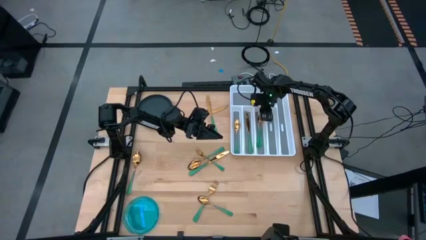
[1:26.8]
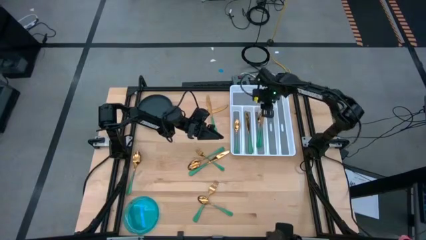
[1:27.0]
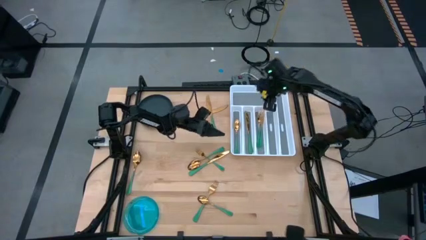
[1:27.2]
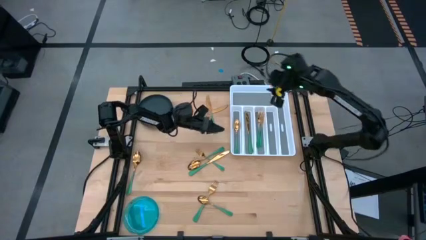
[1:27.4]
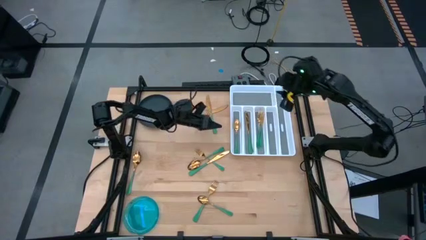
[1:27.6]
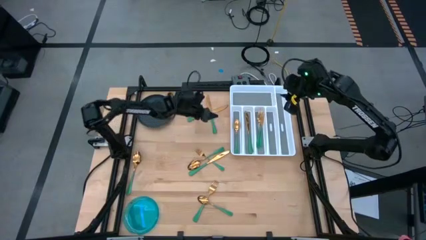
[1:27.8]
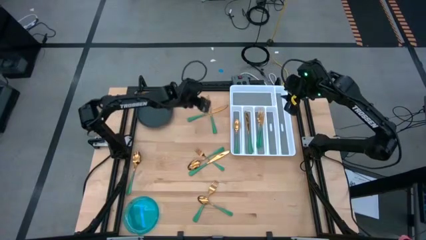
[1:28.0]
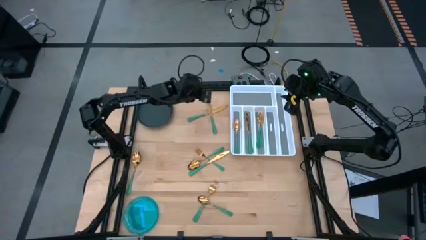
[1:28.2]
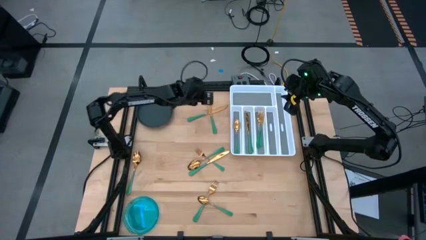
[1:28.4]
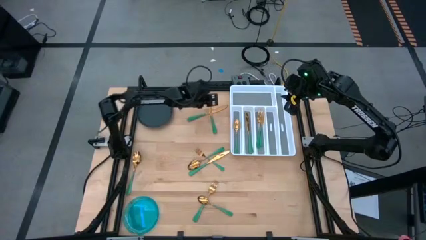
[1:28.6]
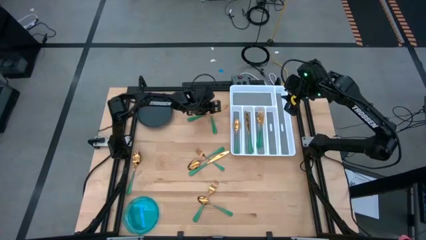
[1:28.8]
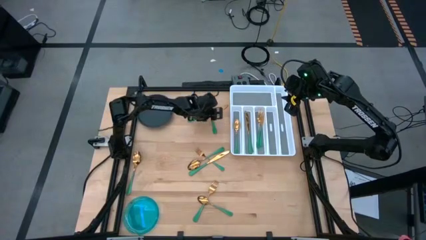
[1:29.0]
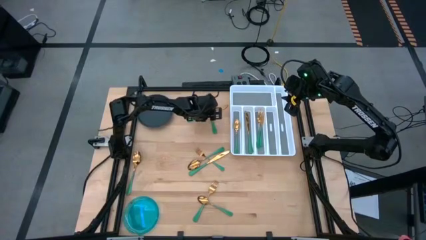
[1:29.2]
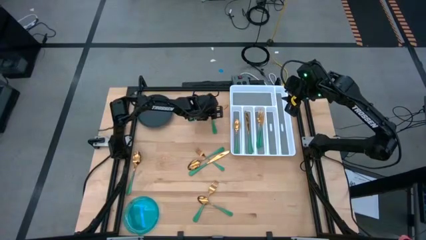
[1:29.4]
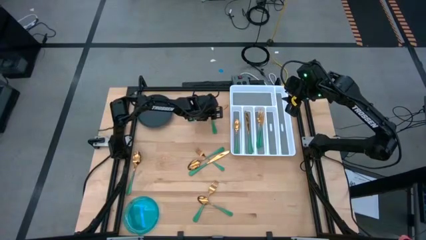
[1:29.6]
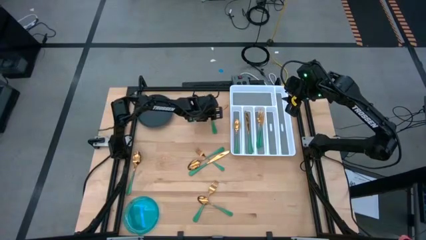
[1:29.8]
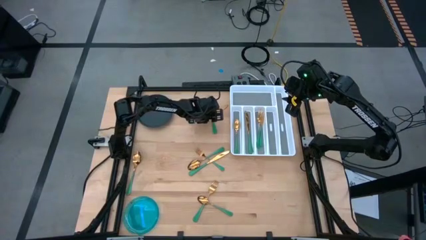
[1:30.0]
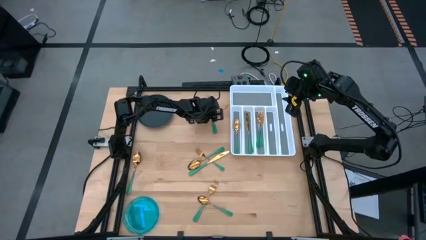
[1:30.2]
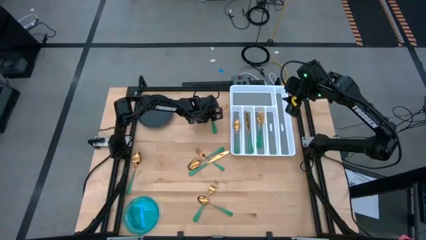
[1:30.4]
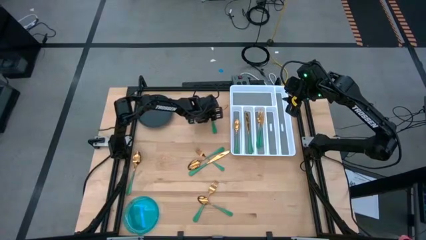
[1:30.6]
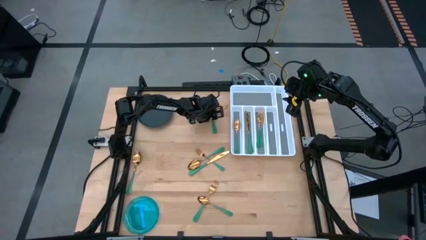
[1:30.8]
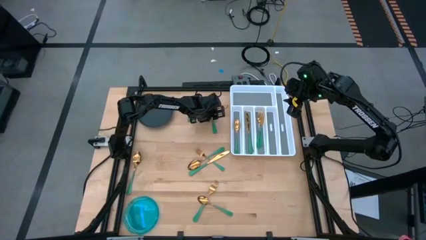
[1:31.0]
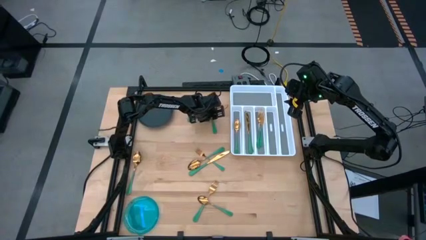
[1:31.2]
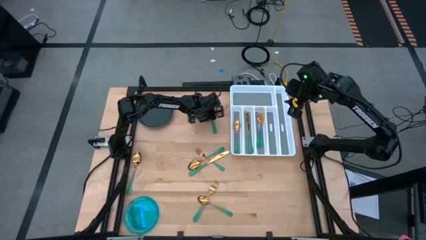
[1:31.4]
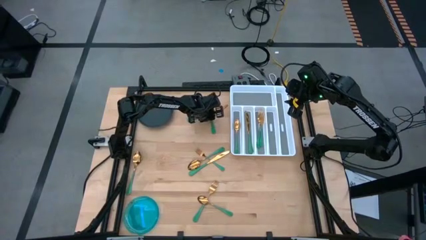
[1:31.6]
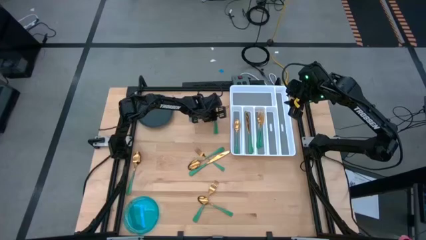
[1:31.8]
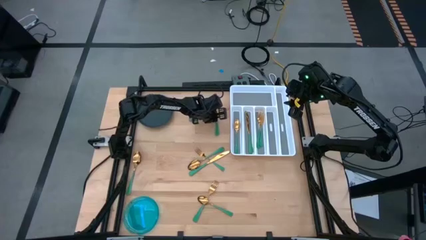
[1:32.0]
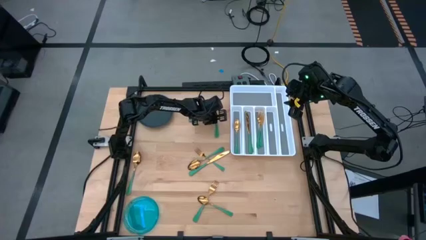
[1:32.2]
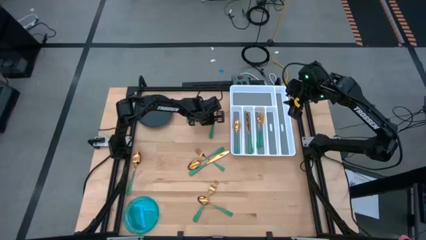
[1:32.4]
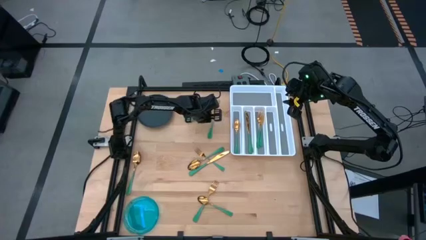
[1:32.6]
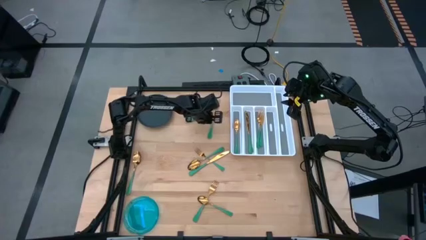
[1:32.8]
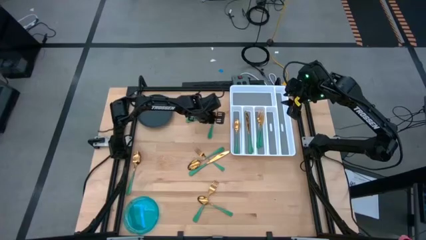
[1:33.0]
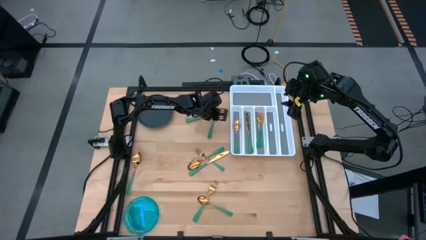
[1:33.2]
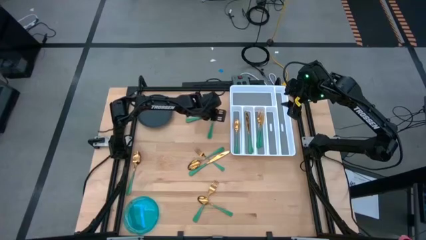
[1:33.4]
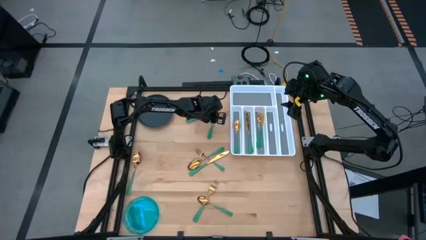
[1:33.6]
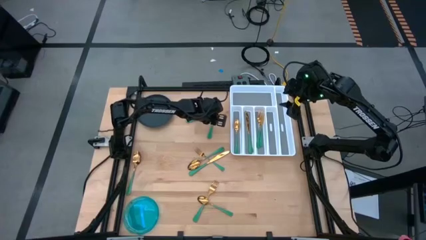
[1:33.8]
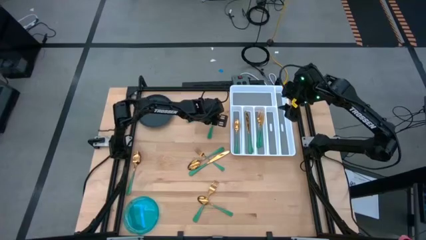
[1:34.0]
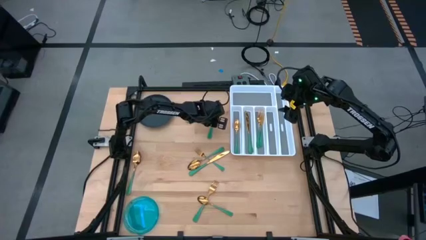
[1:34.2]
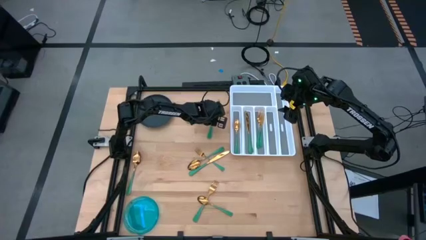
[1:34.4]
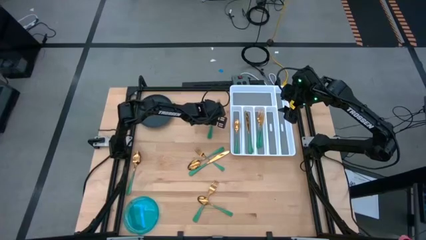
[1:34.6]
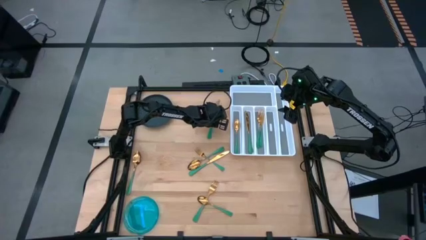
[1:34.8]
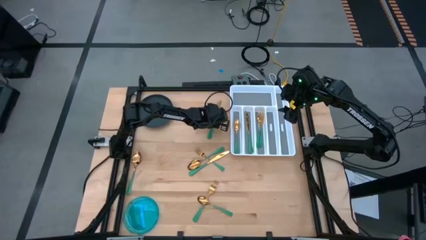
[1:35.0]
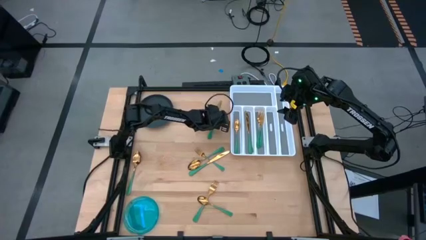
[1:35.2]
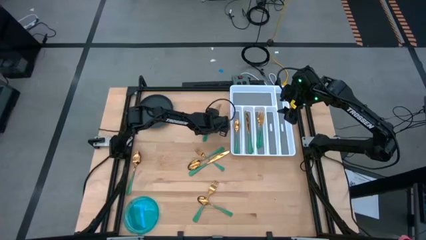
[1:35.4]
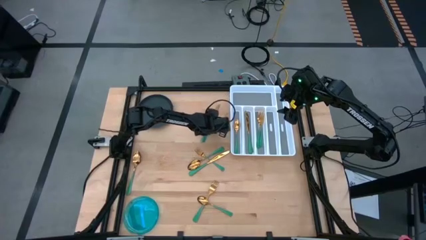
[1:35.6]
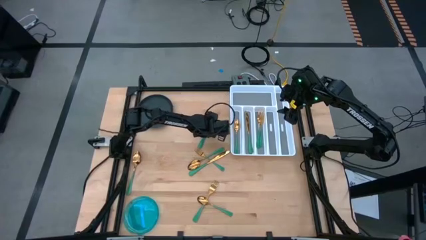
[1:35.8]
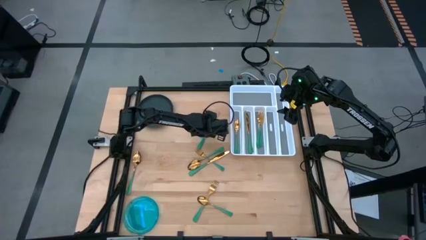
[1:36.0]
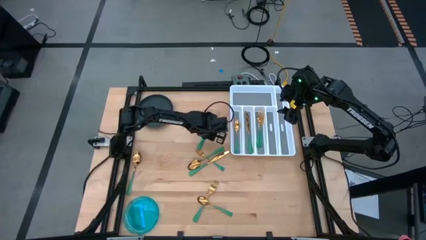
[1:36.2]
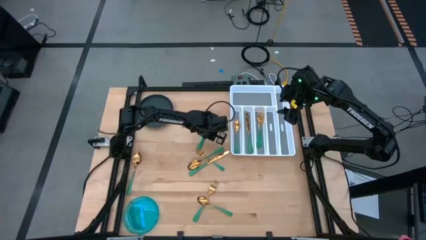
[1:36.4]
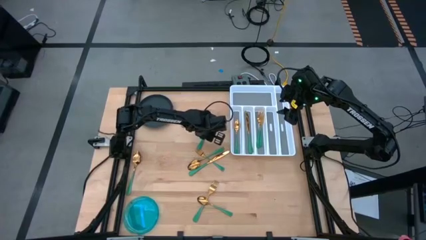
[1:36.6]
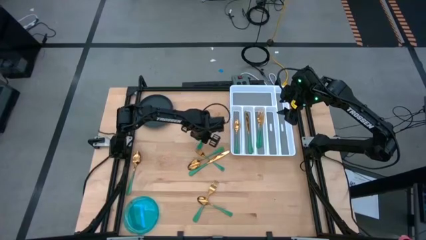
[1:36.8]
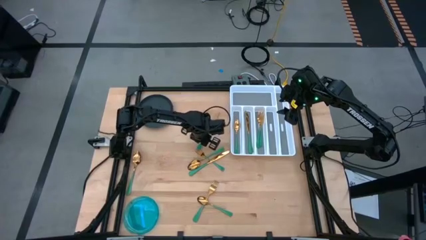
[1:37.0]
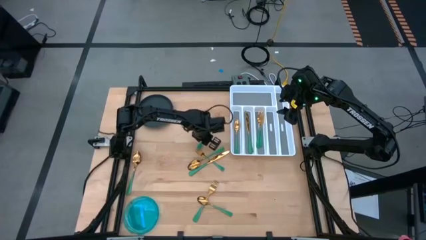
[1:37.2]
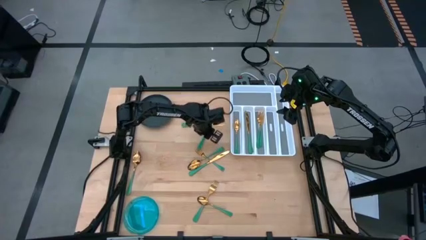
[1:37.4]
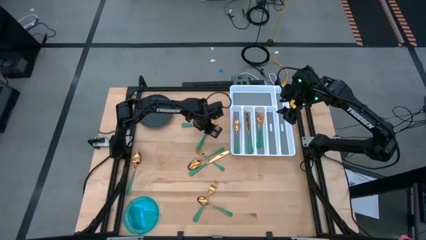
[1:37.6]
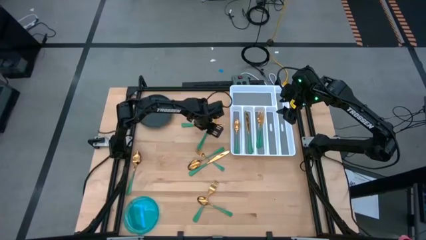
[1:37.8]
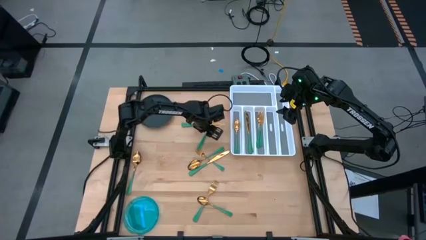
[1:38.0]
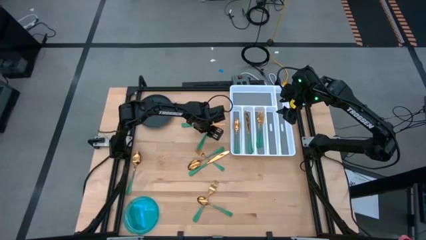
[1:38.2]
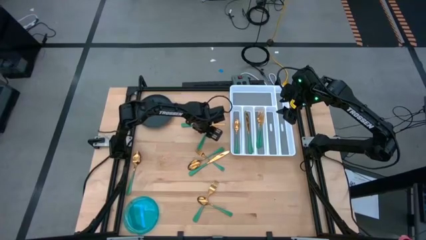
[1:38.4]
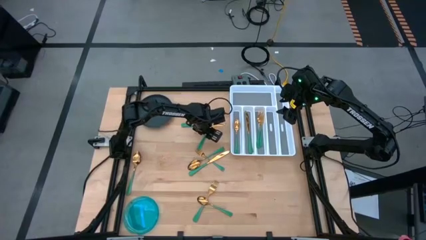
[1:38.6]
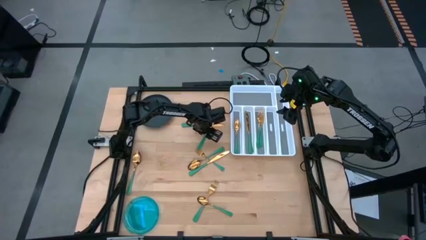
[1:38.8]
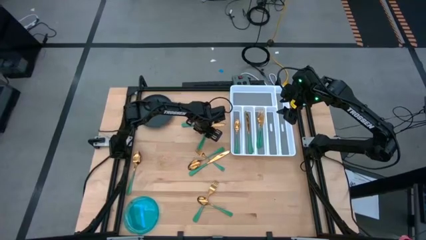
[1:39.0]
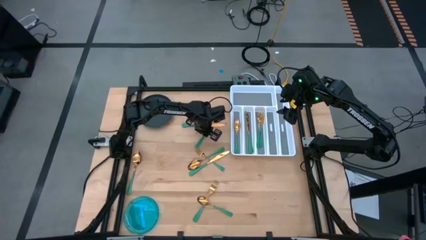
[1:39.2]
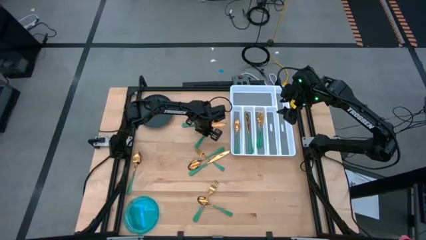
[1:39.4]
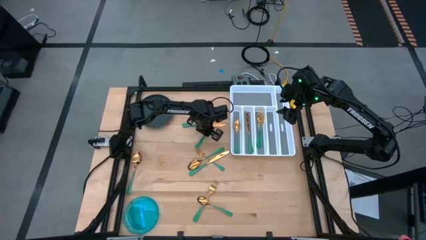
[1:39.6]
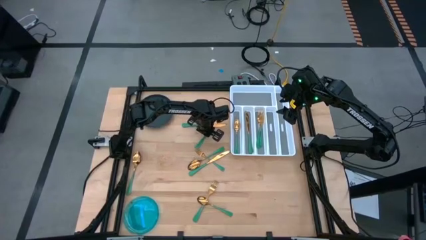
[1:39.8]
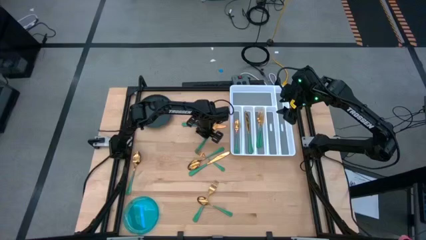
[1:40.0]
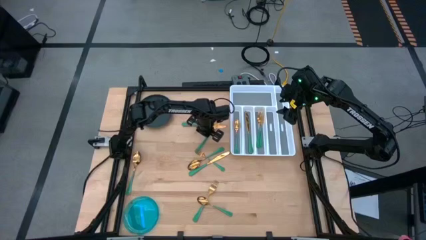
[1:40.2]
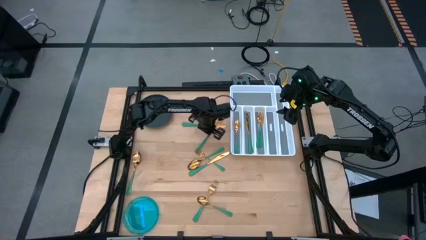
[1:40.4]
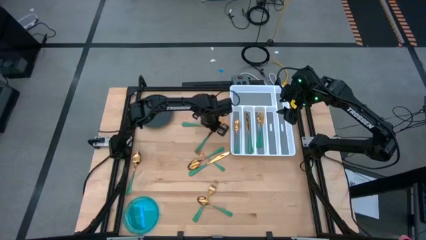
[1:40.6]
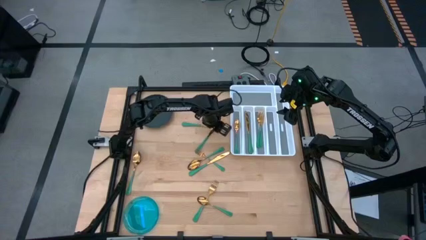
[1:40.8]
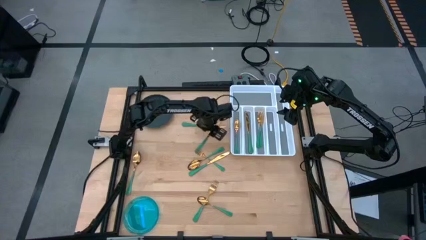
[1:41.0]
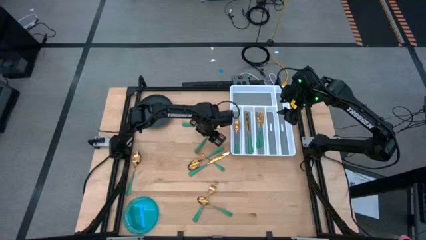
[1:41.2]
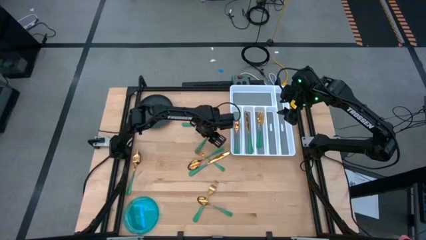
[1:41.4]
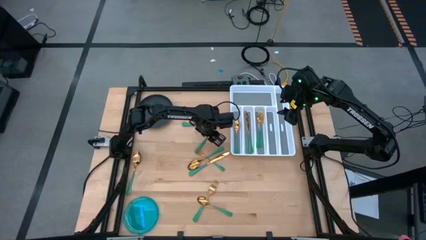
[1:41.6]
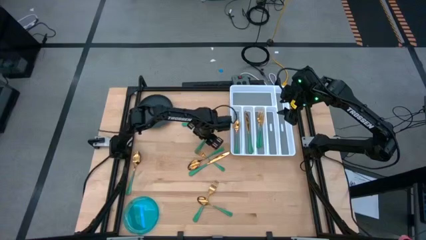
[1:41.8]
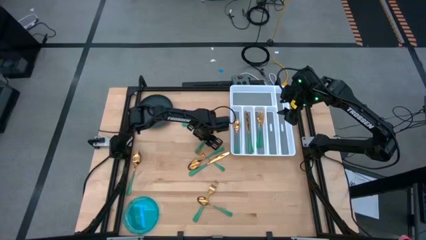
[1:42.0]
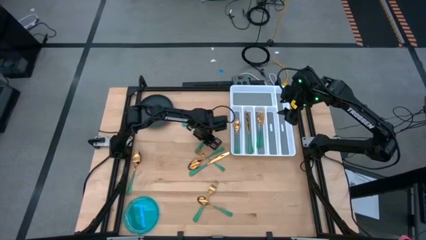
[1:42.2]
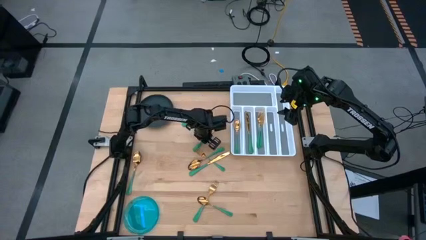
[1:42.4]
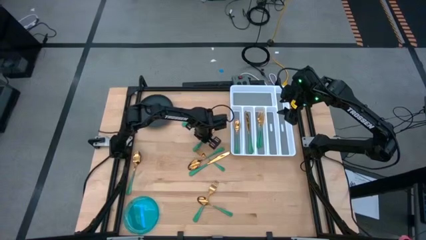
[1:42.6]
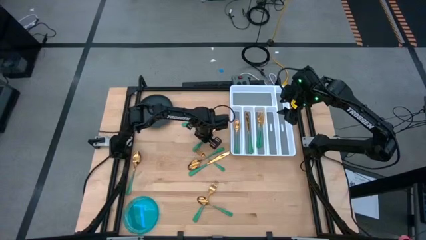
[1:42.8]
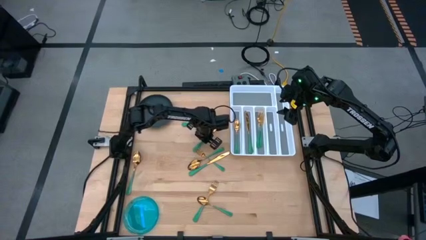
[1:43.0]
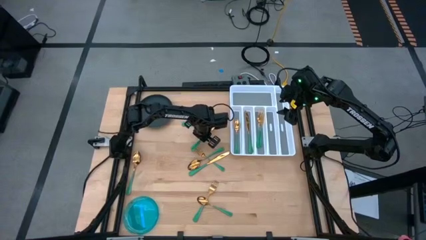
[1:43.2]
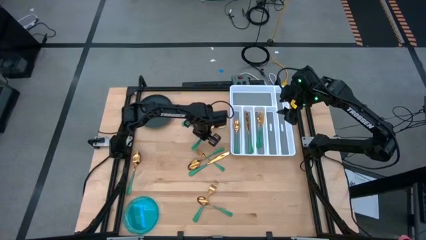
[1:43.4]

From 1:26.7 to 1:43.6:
Task: Sort silverware
Put the green knife on the silverware organizer

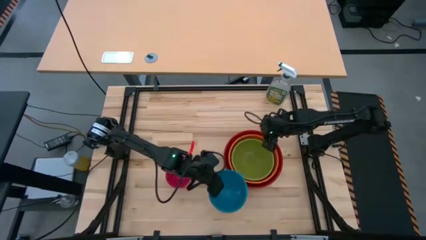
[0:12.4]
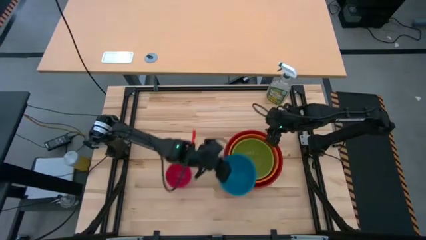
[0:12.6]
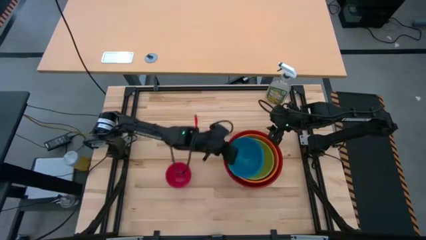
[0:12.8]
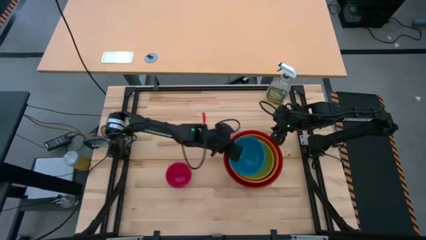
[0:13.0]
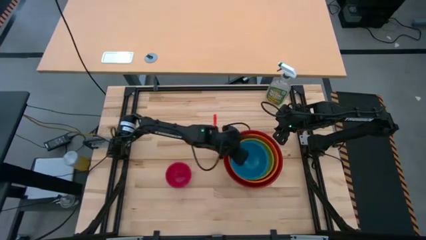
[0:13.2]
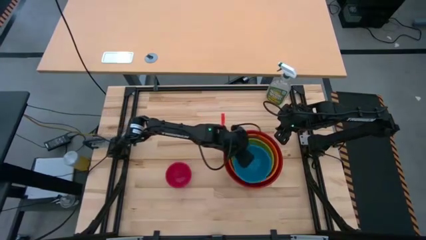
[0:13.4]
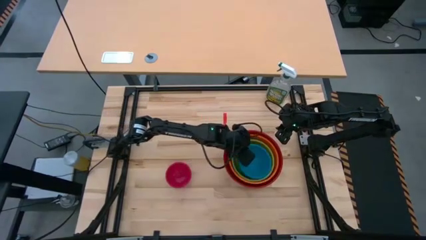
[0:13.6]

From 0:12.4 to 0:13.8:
Task: Nest bowls inside each other by size order
Stack the blue bowl on top of the green bowl
